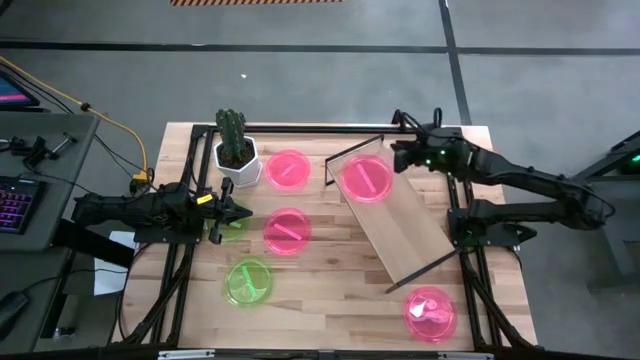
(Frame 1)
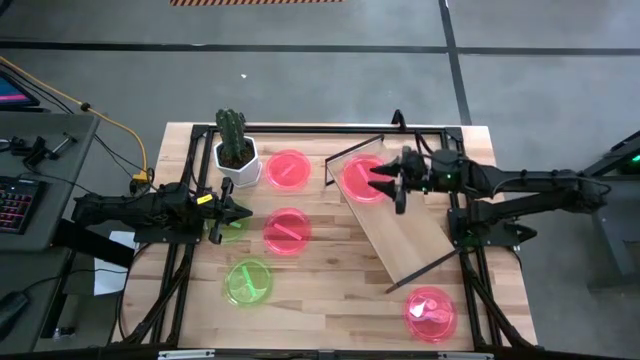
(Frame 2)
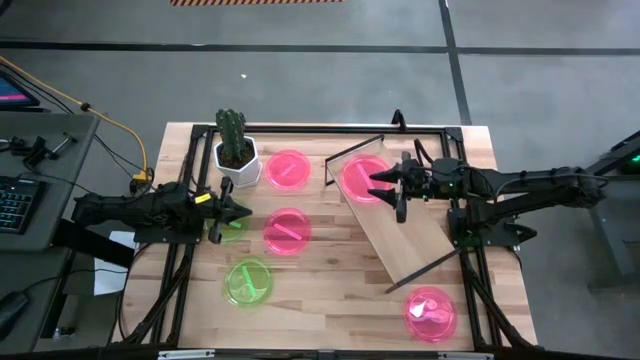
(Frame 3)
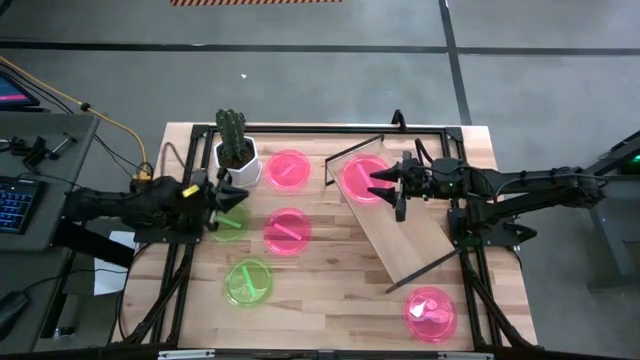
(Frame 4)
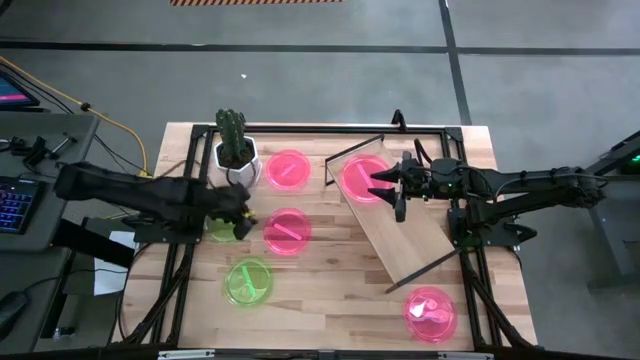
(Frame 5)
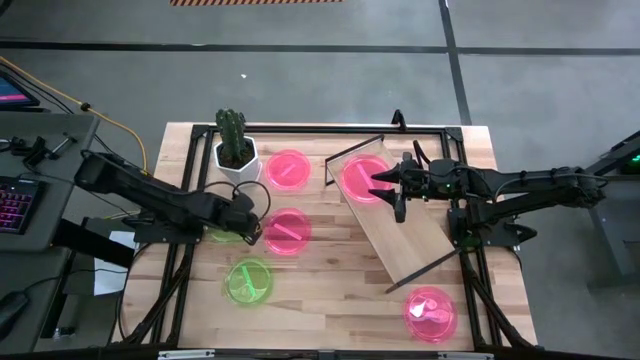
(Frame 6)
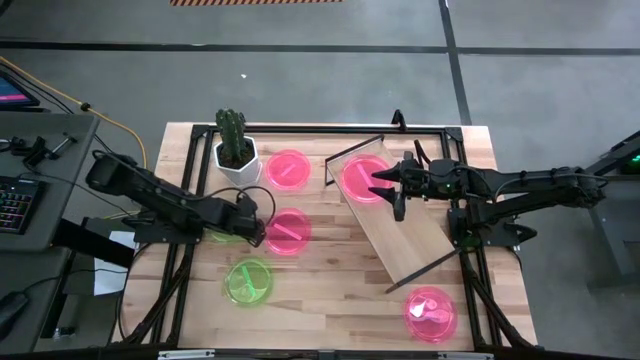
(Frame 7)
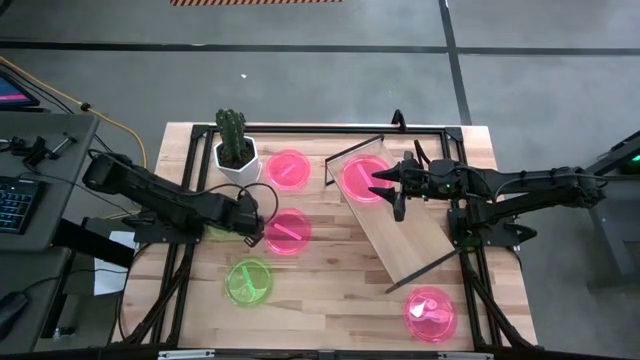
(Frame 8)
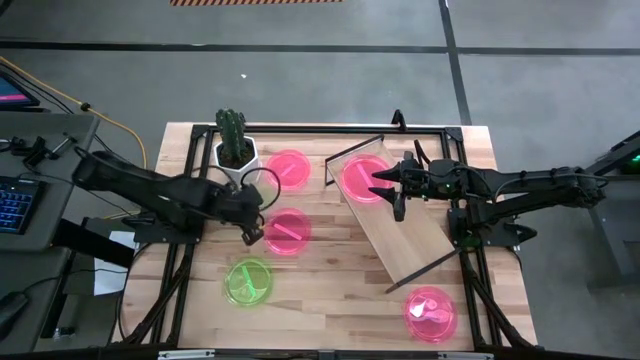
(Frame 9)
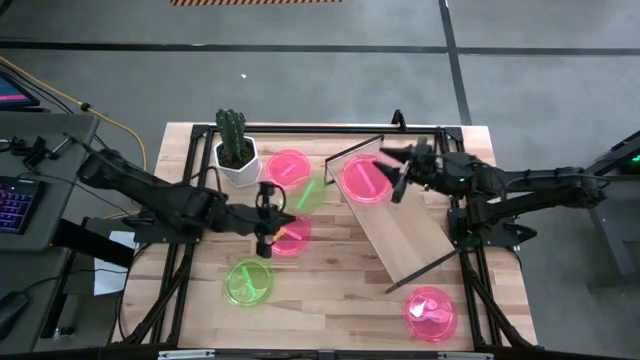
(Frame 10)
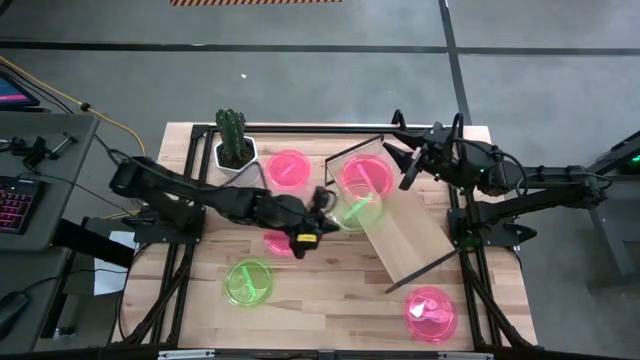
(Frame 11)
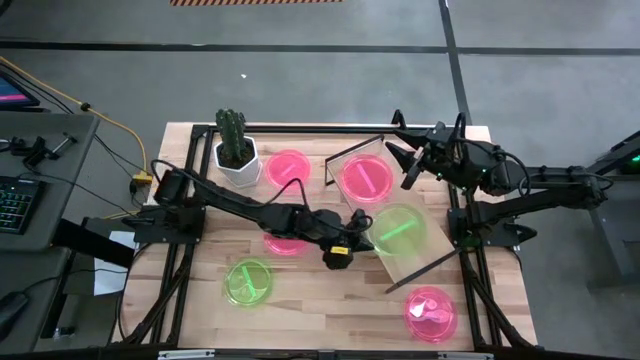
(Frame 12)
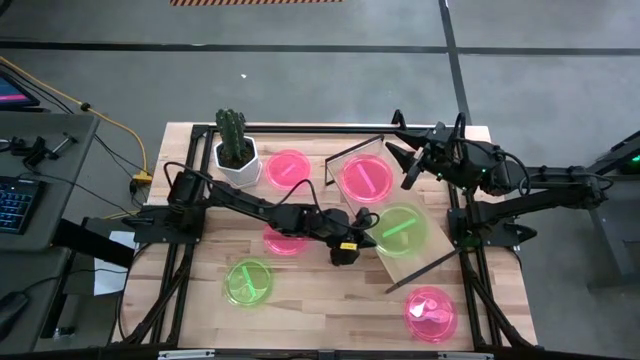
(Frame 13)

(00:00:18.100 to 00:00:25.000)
Task: Place and stack plates onto a shelf
Put the green plate on the shelf

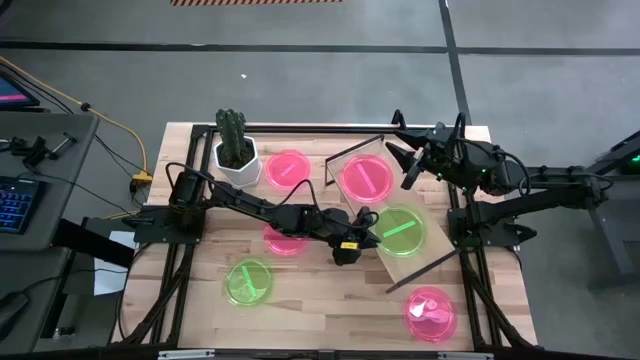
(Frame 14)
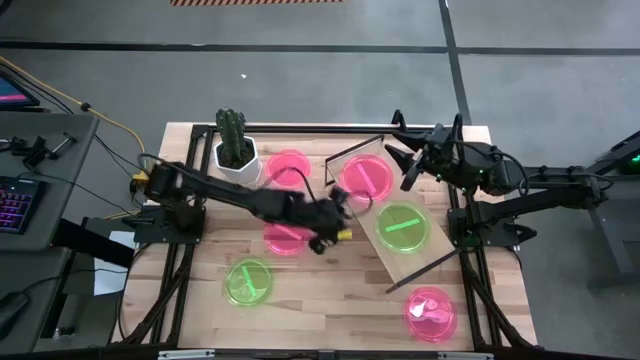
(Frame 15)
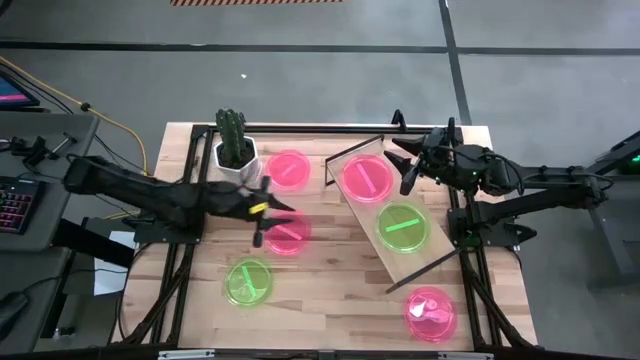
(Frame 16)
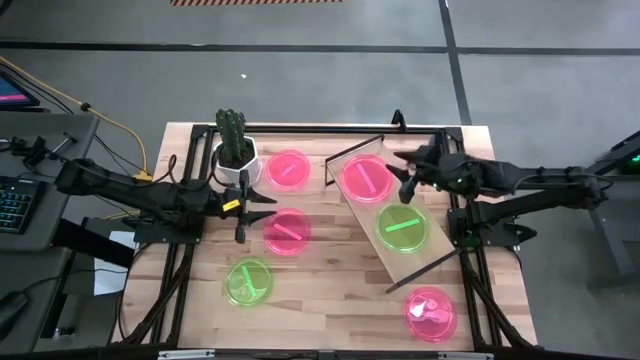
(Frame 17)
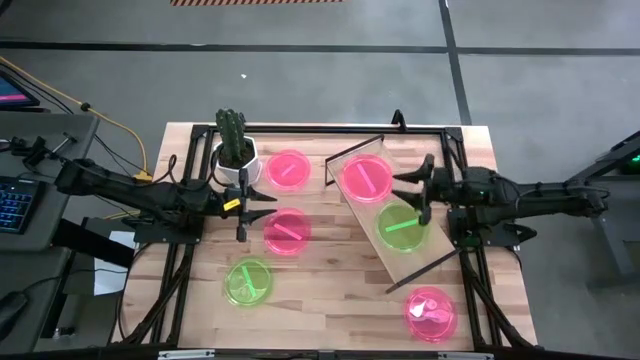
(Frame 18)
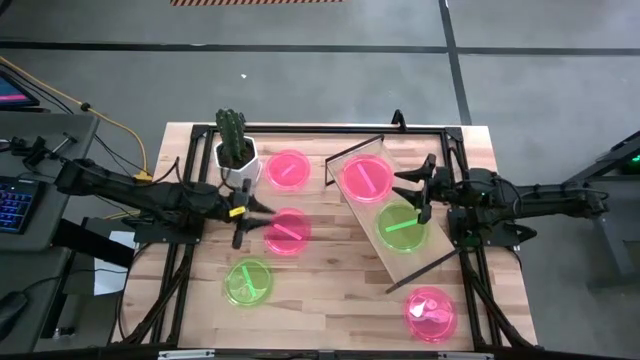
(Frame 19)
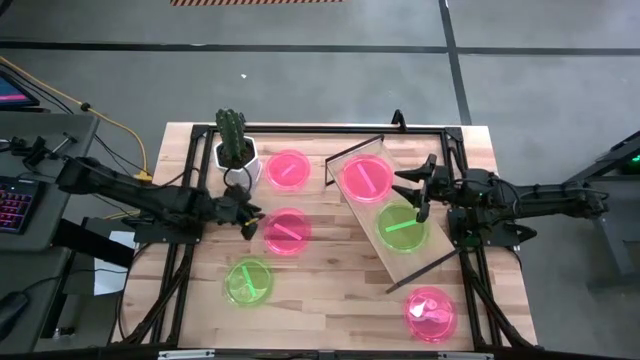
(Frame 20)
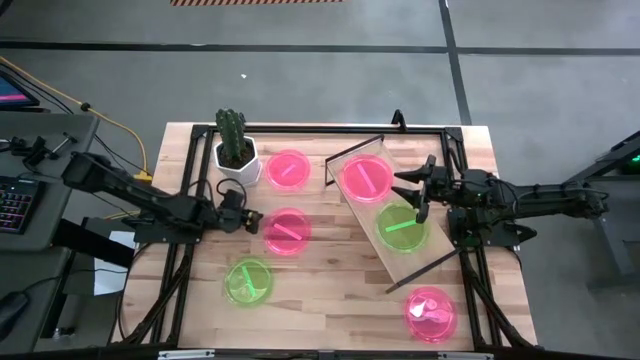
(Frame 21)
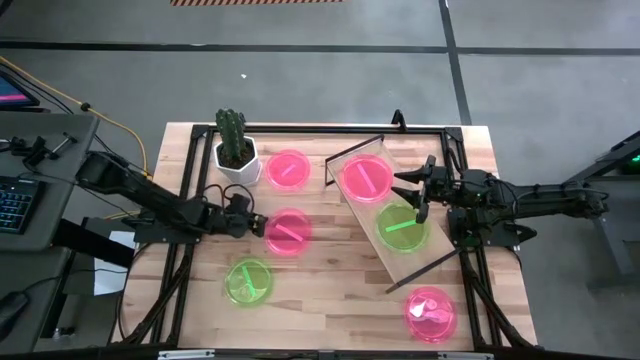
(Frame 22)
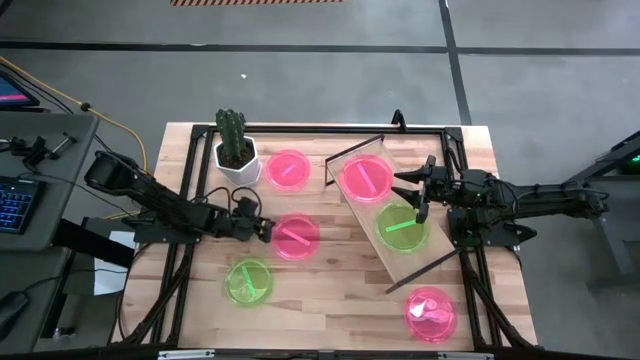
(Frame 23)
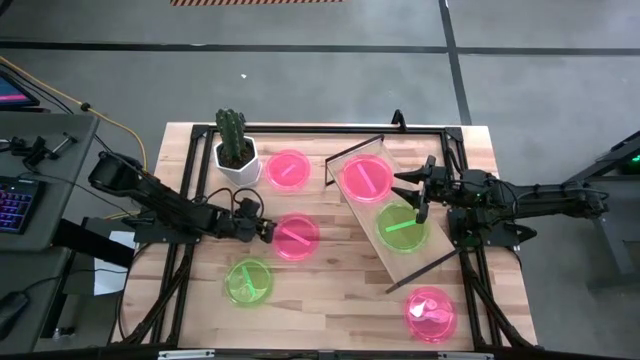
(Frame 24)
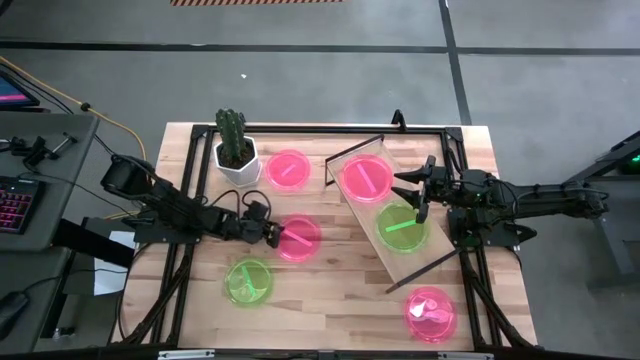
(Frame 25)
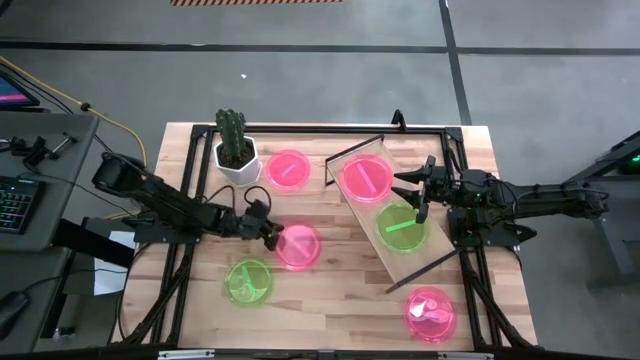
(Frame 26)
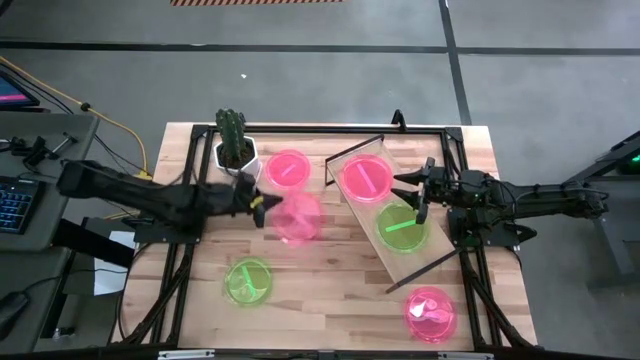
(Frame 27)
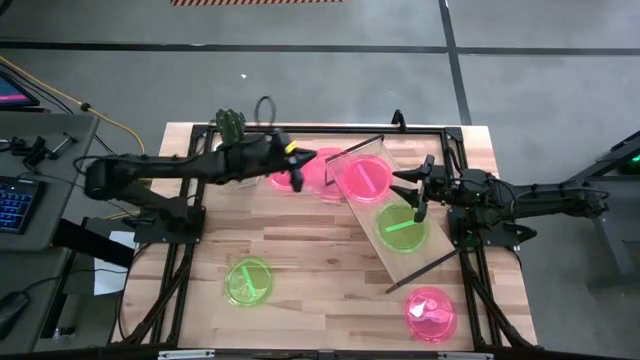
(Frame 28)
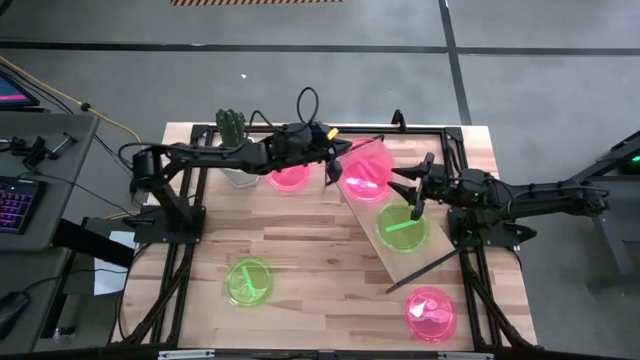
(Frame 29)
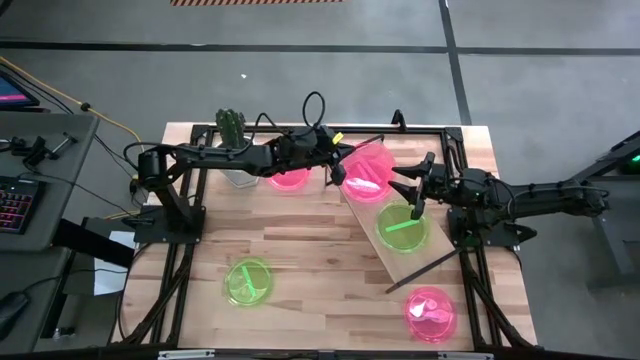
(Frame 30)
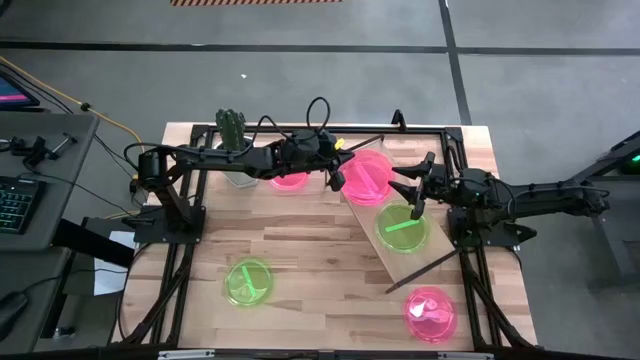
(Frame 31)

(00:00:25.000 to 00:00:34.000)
Stack the pink plate on top of the other pink plate on the shelf

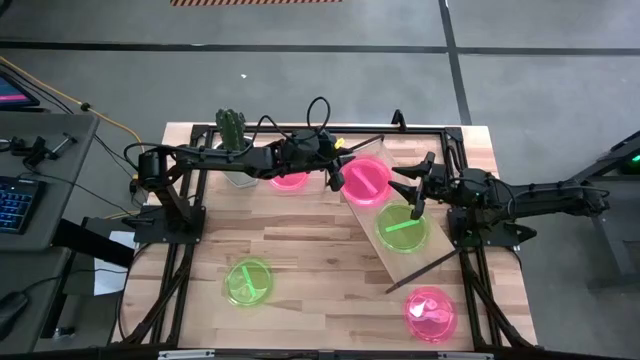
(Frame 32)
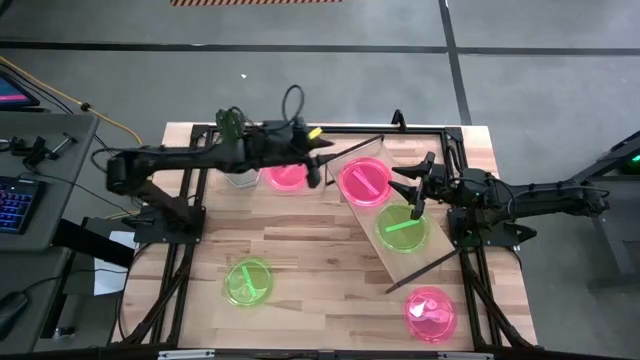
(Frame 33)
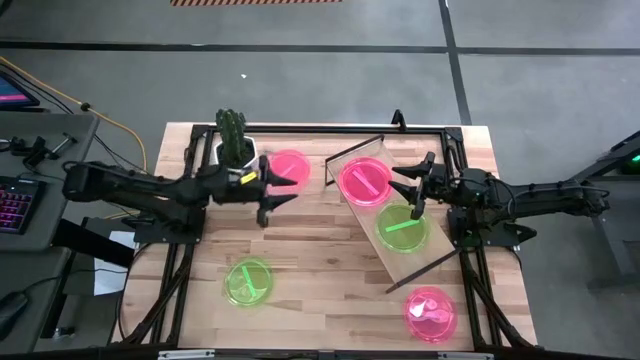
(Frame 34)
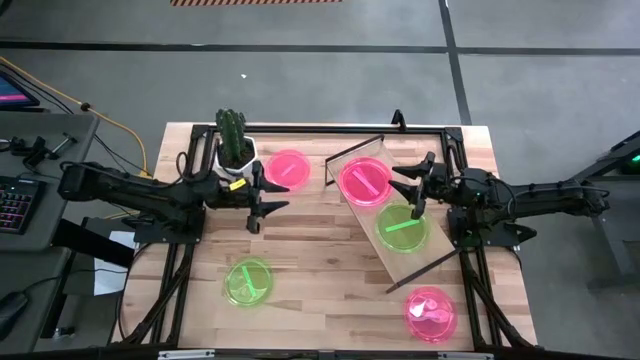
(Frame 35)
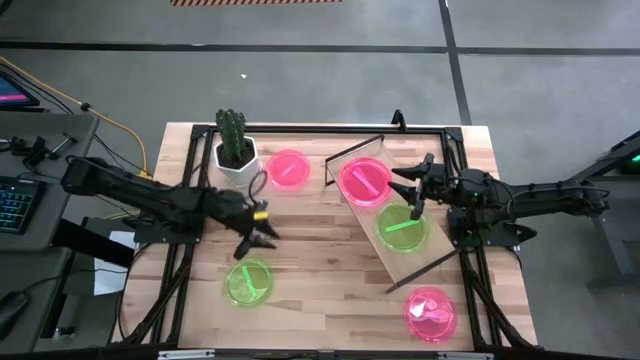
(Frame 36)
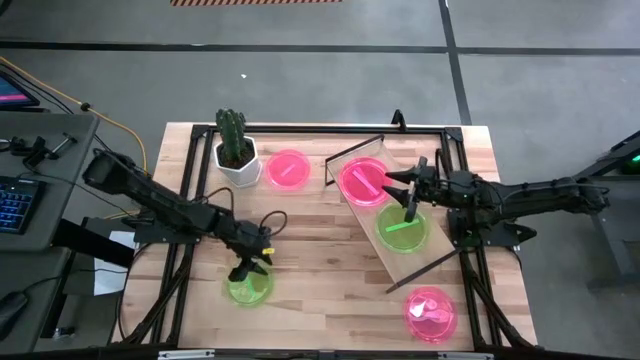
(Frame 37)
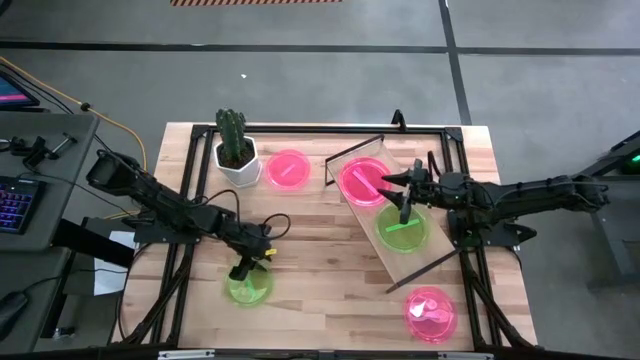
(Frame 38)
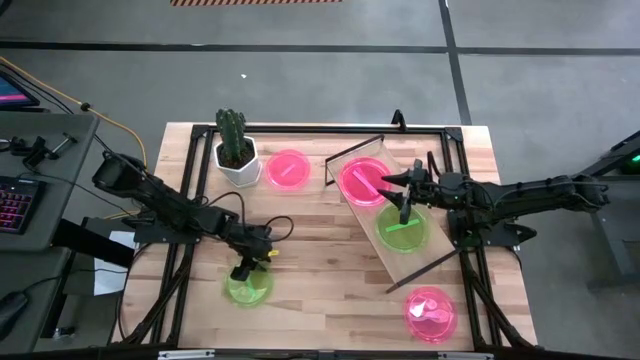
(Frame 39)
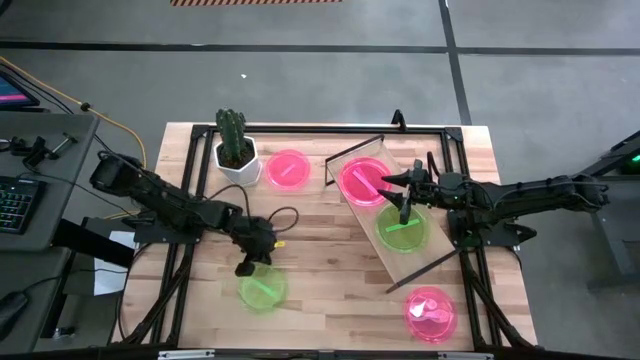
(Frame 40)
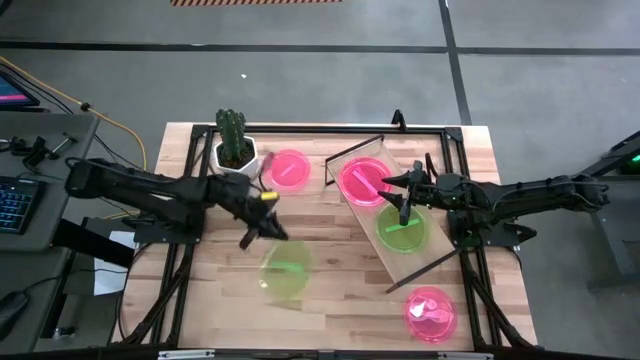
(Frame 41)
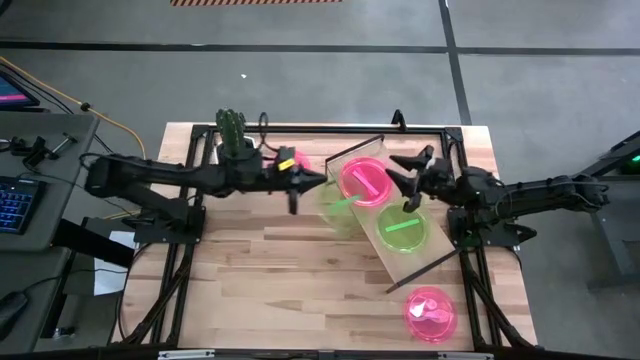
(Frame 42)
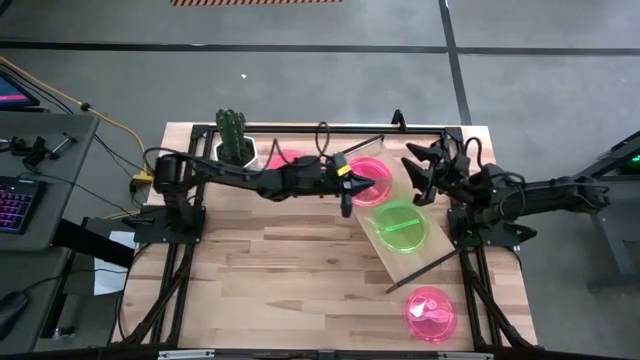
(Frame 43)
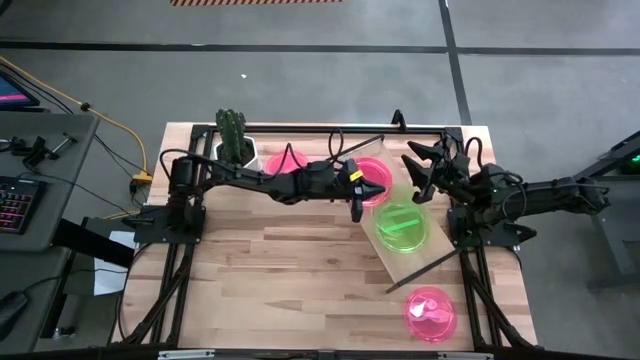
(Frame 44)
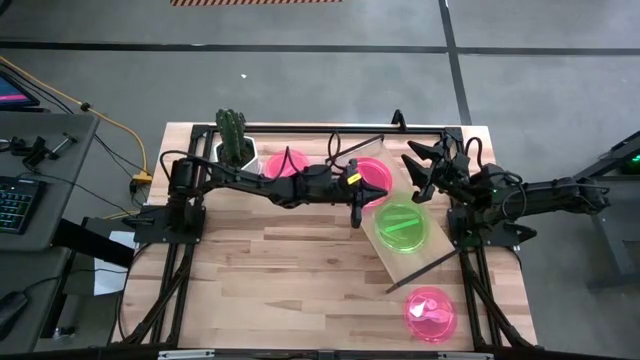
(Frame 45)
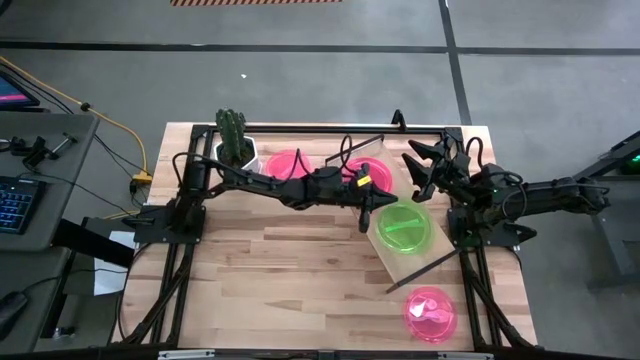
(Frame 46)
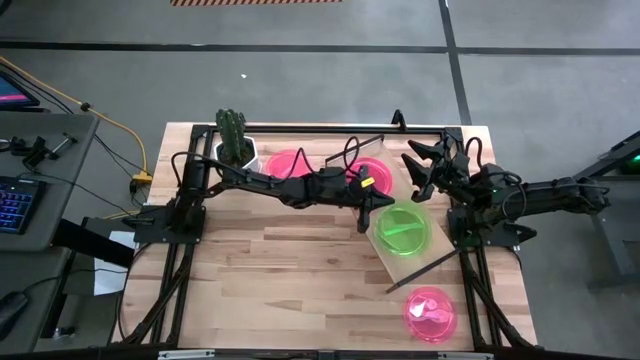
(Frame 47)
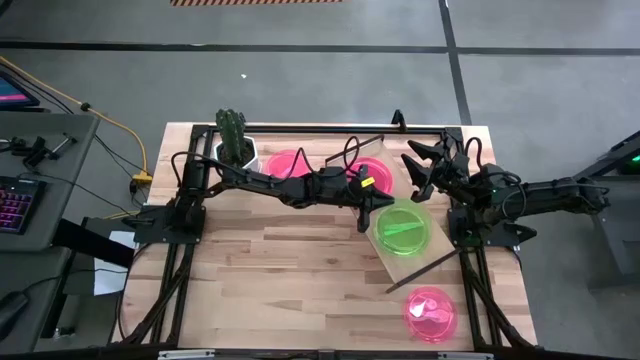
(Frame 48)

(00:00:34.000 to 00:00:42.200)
Stack the green plate on top of the other green plate on the shelf
